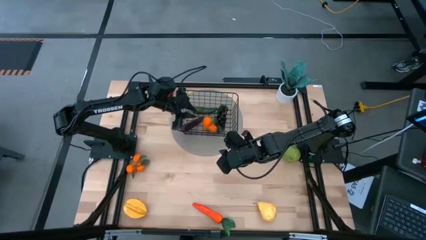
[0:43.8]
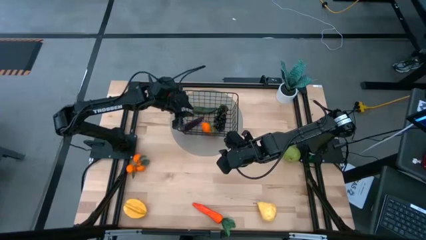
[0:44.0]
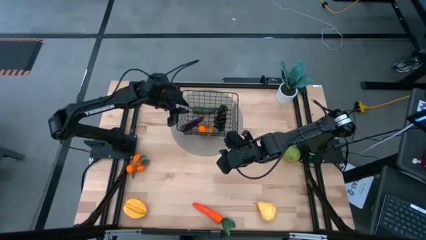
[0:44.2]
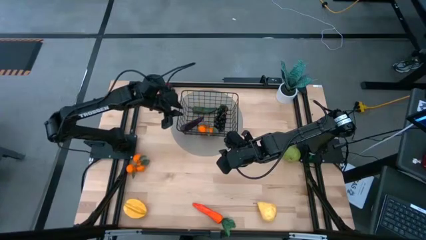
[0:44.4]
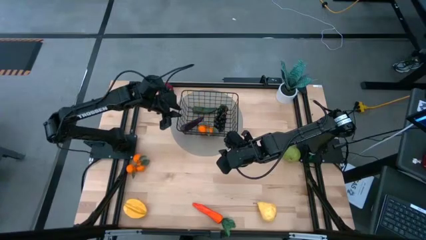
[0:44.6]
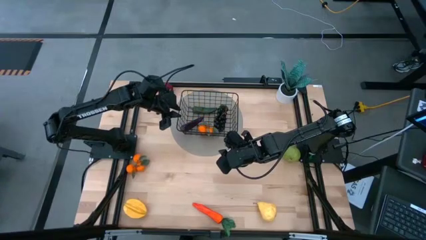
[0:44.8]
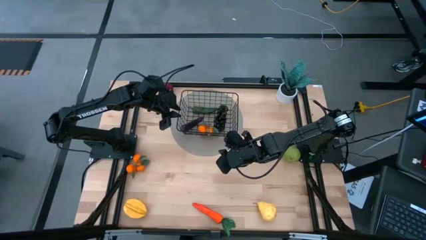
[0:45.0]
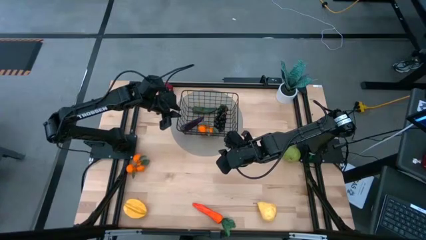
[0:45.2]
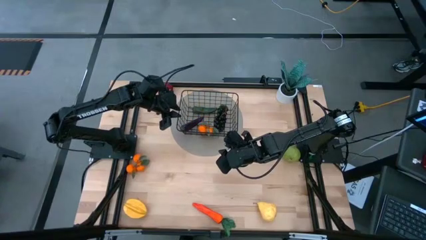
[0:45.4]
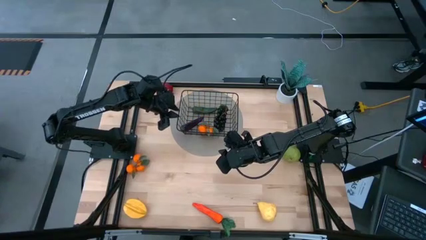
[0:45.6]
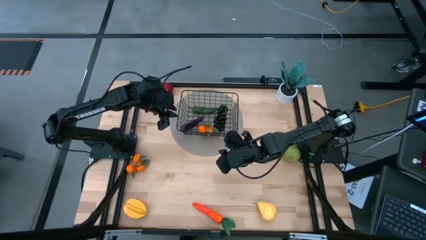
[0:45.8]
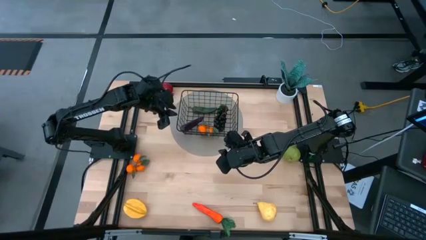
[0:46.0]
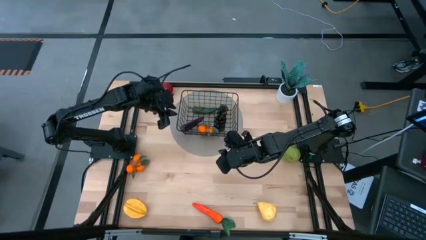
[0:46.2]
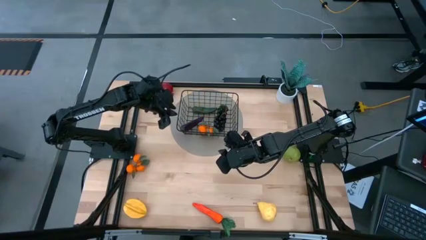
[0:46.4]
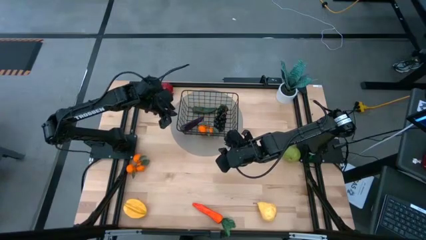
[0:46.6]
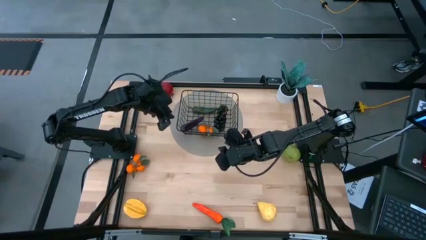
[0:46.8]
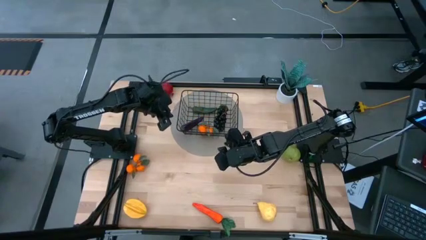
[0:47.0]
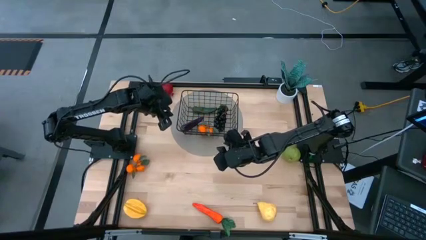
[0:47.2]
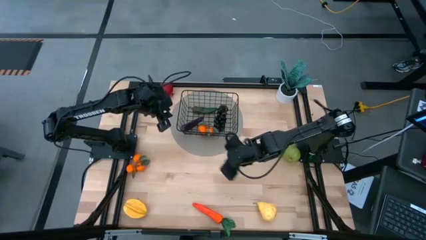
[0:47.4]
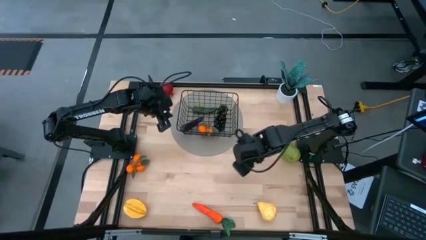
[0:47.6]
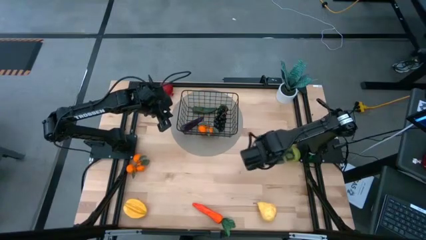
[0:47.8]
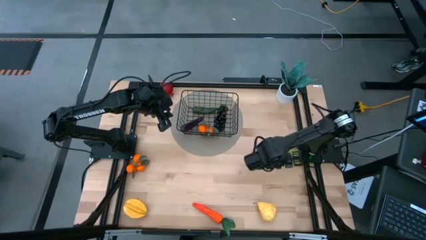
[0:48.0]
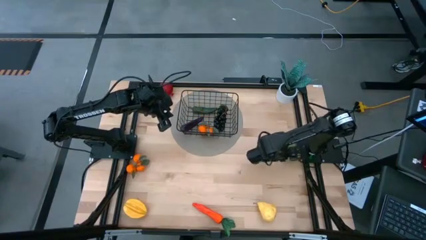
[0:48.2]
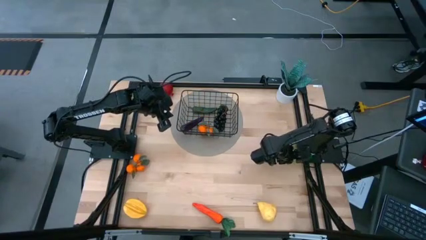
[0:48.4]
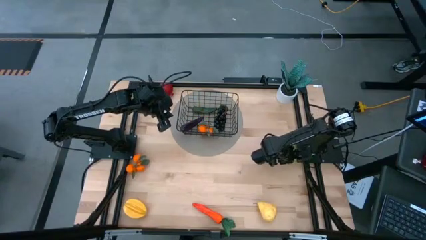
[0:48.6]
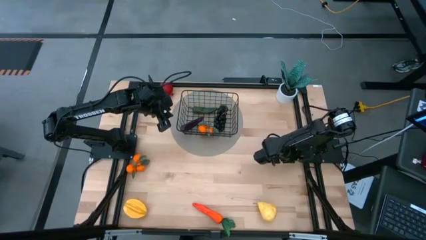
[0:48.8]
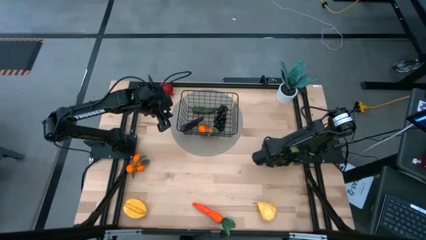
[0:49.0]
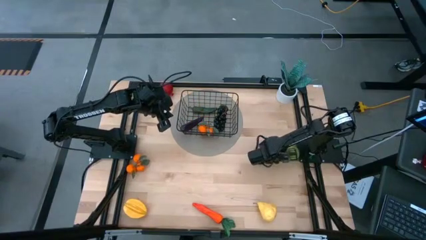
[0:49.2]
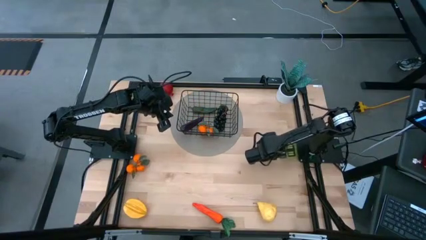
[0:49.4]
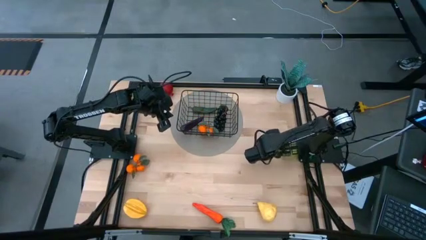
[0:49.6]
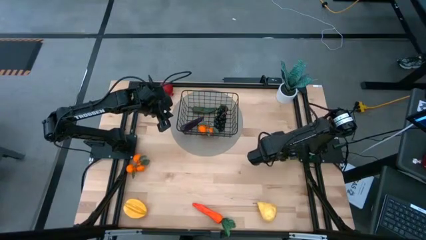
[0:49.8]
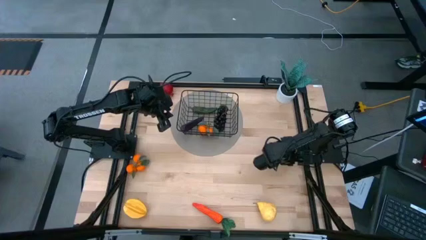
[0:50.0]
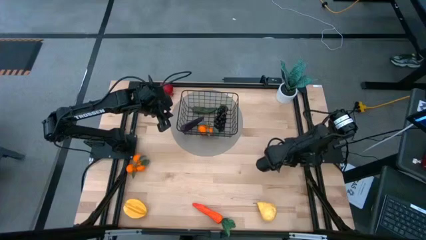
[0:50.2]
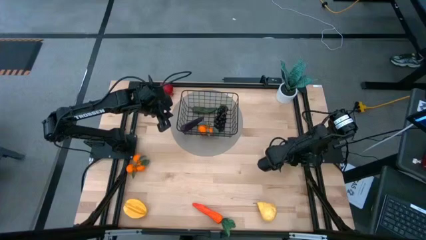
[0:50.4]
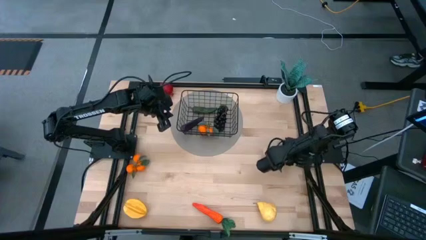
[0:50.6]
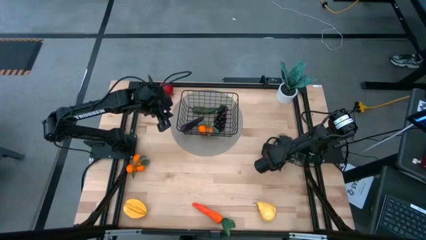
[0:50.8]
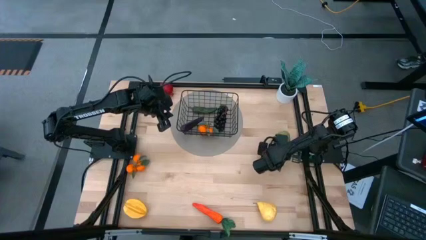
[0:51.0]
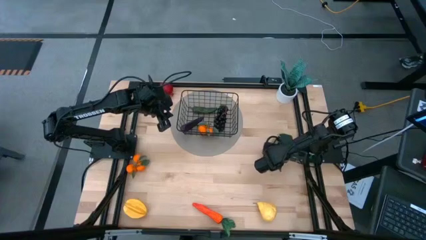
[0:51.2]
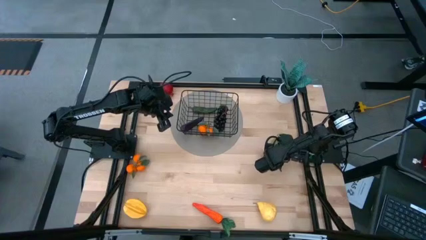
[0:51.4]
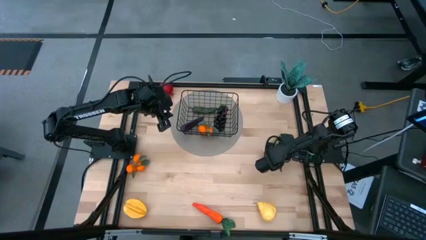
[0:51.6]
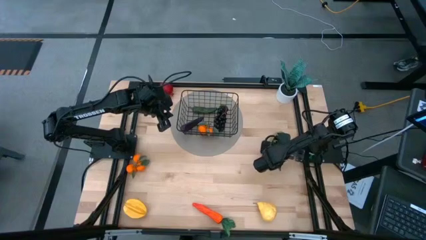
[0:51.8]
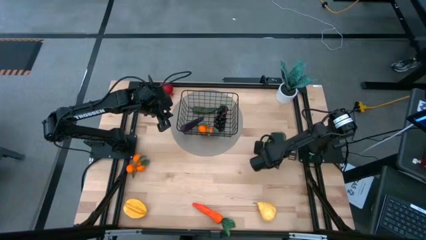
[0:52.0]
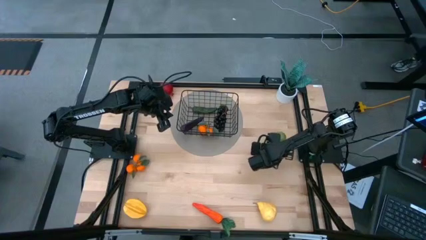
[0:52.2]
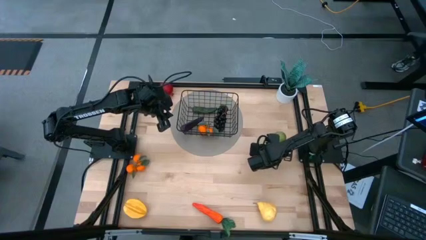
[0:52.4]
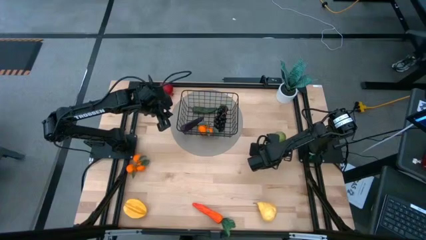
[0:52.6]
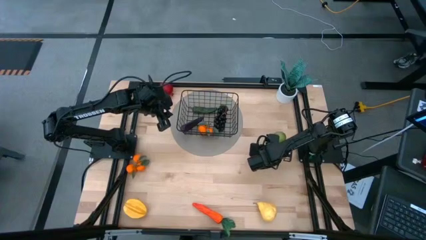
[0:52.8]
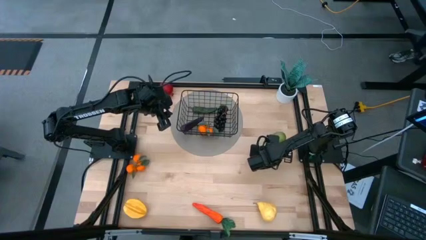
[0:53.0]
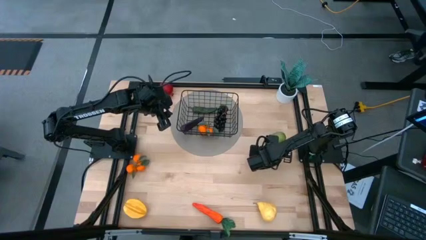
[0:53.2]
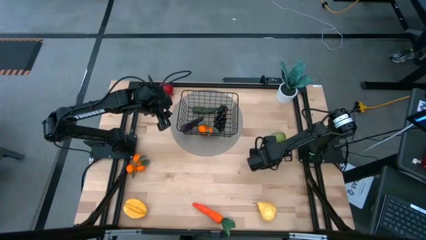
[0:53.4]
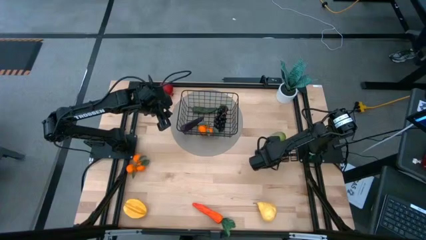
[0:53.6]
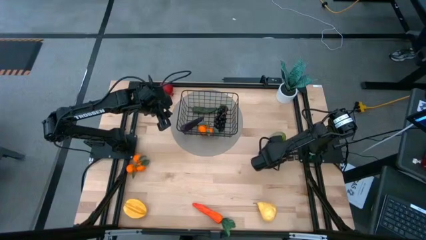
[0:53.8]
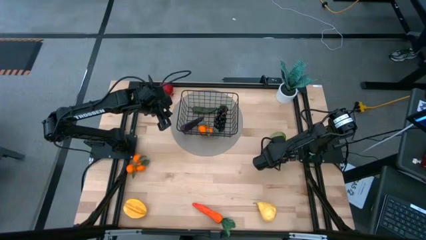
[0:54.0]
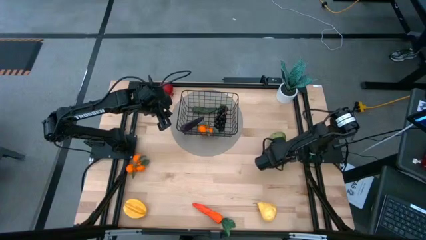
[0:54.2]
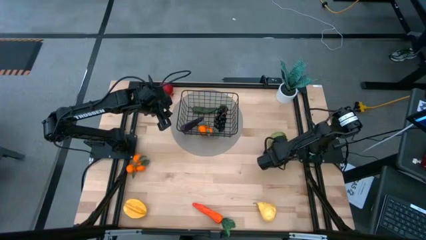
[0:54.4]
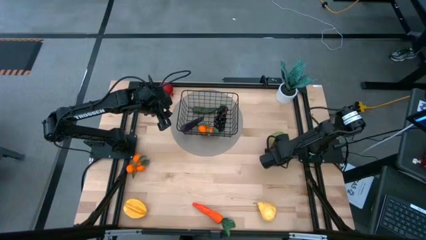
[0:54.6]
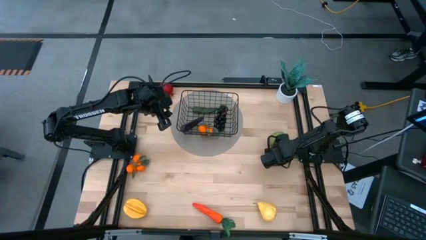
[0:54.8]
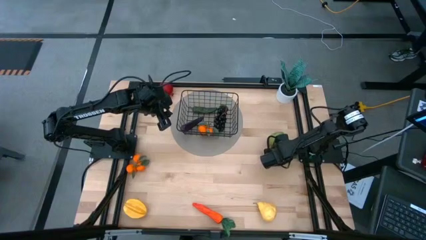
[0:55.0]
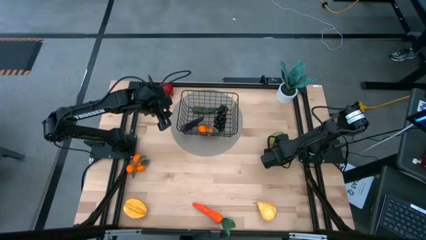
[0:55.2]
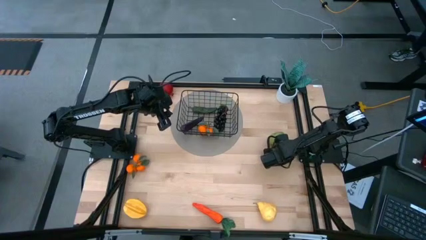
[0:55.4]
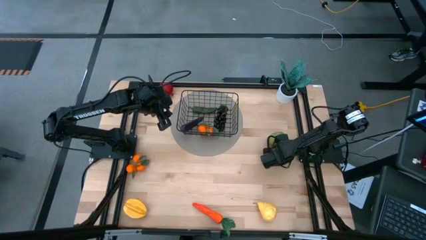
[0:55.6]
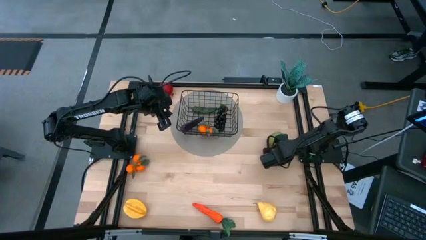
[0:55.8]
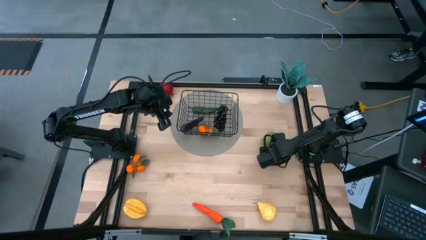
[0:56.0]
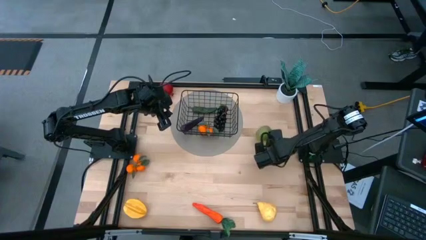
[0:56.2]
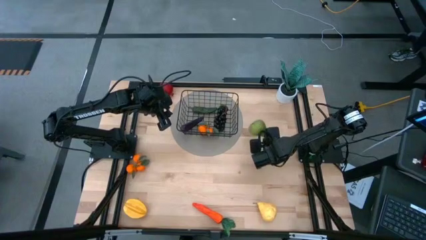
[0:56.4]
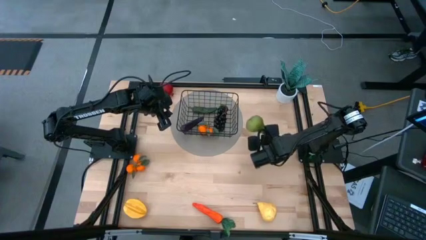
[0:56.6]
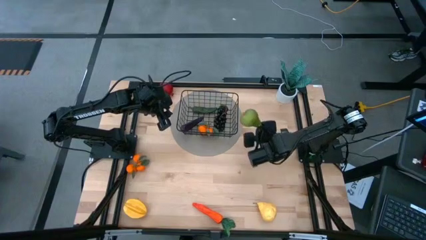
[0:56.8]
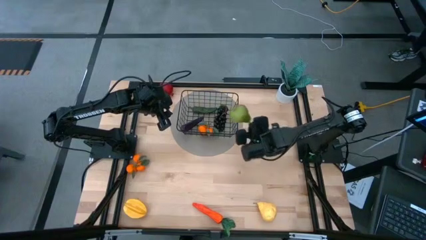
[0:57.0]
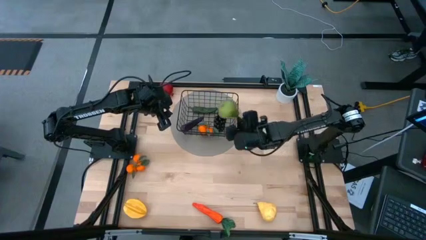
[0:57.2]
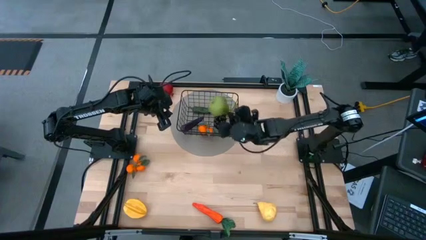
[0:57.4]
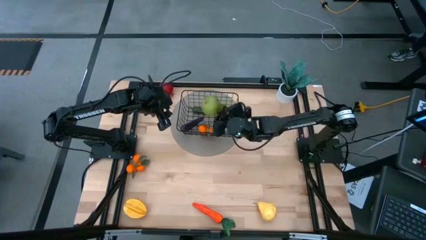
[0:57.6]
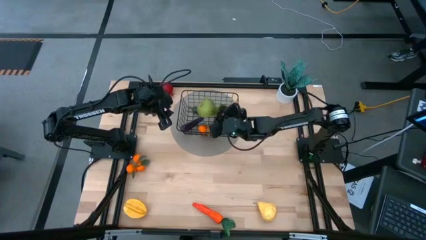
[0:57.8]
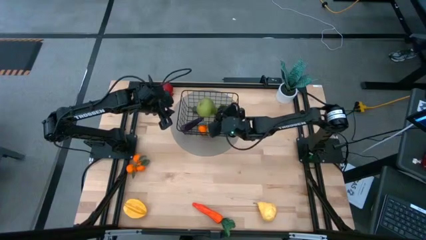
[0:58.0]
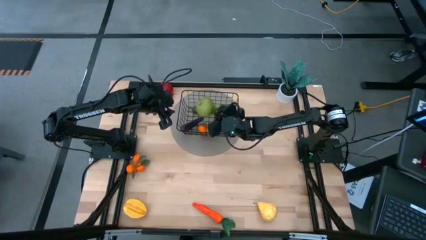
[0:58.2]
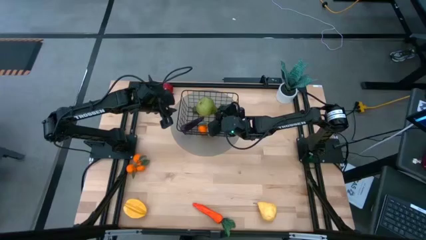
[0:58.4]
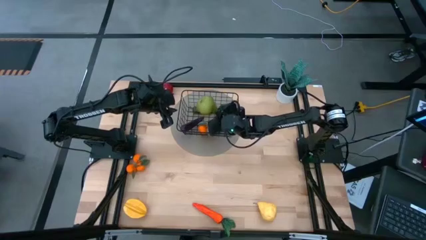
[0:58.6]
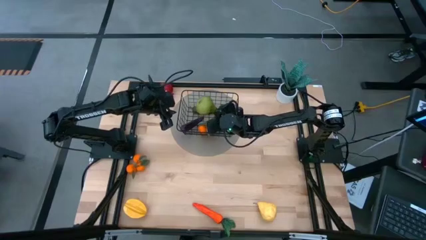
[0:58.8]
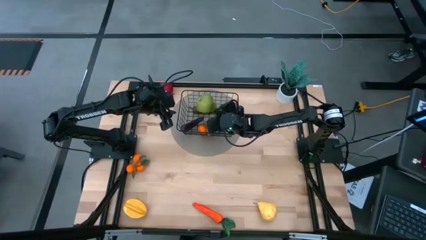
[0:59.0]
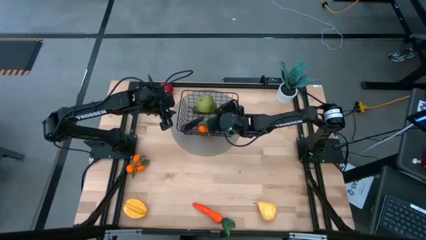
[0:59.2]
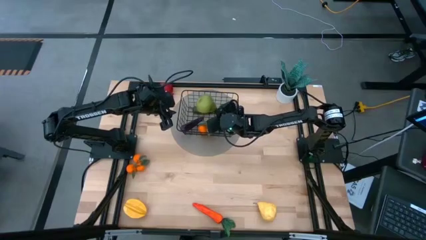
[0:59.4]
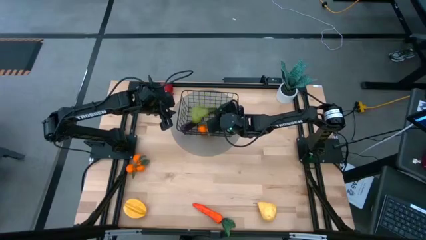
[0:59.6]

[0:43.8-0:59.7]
Task: Build produce basket
Put the green pear into the black wire basket

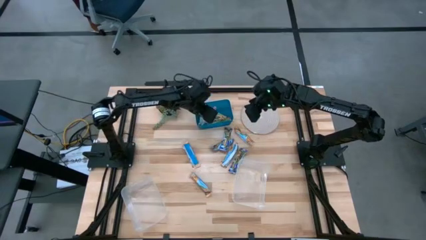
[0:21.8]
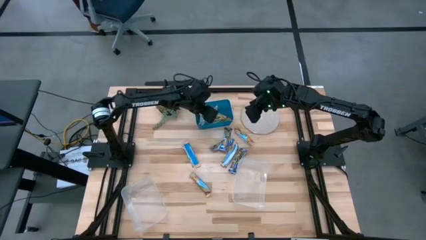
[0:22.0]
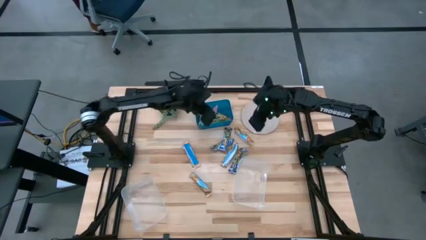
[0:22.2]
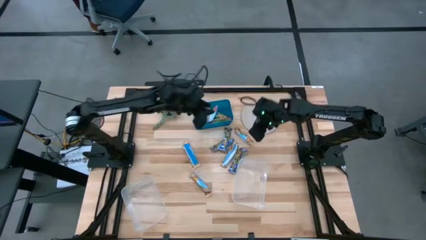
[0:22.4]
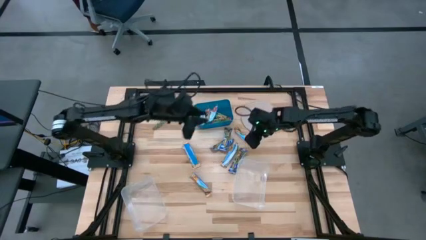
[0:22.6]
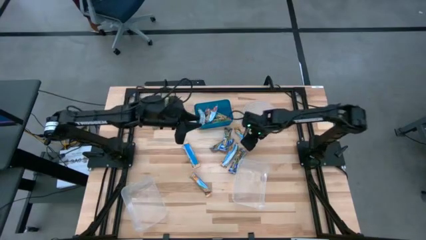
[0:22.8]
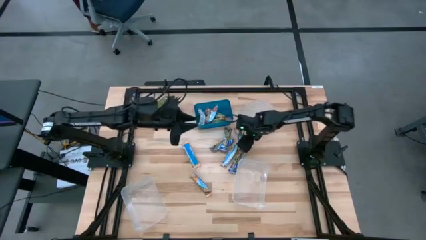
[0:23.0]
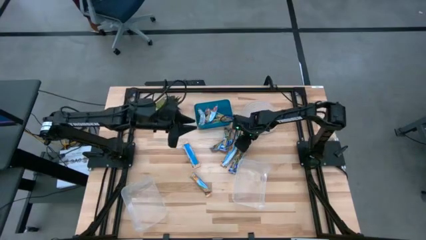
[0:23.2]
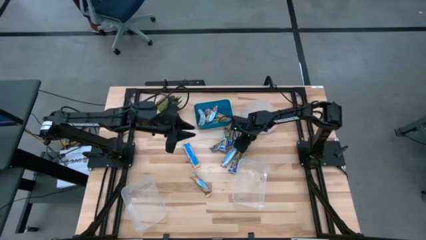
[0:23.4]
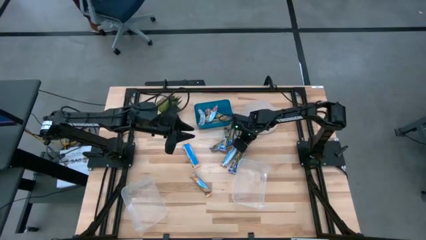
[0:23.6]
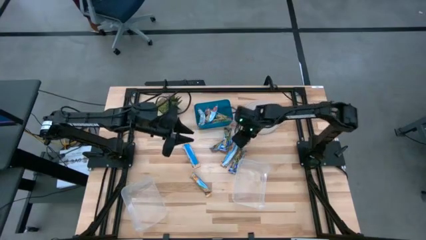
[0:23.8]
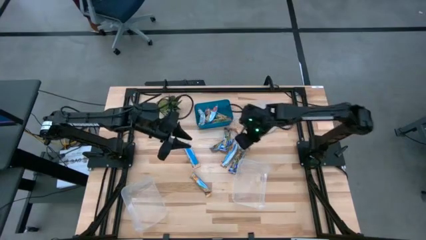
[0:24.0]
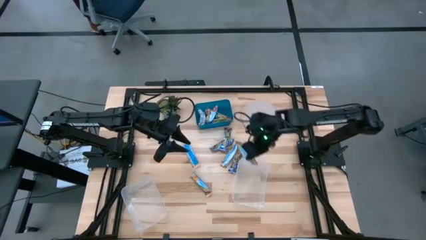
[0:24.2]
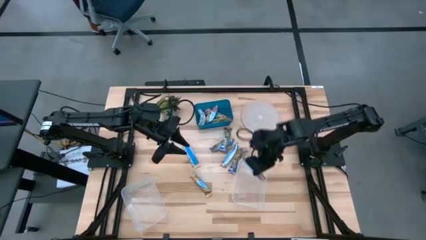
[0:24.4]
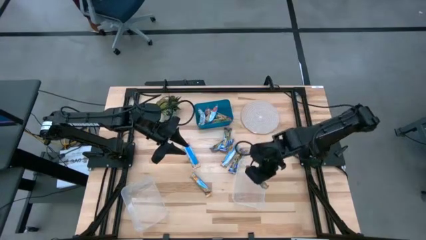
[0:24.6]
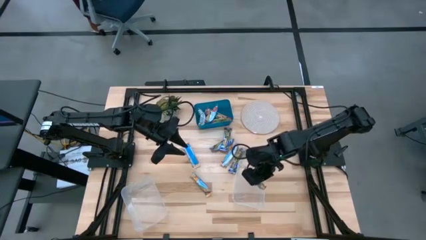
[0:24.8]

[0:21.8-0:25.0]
Task: Pick and place Granola Bars by type
Put the yellow granola bar into the right transparent bin
